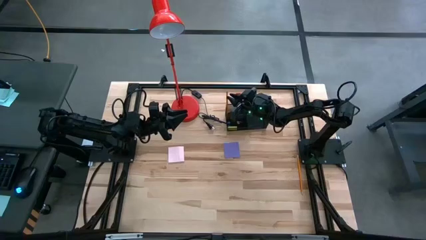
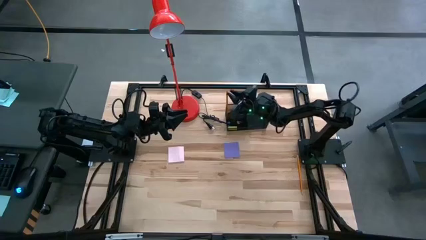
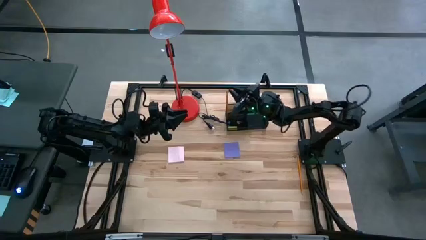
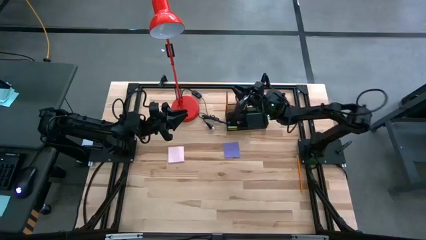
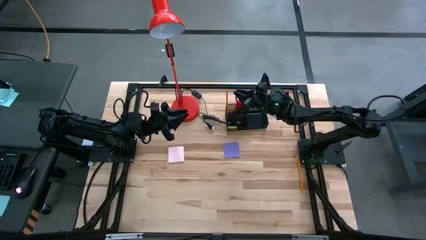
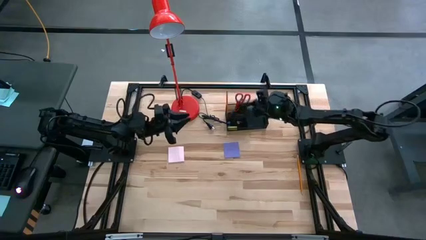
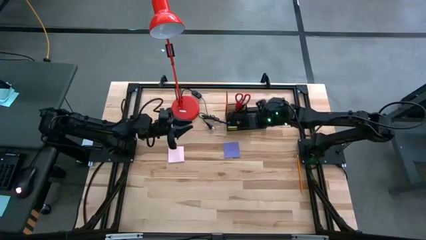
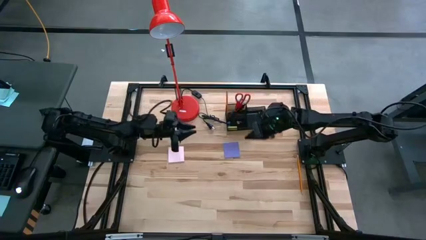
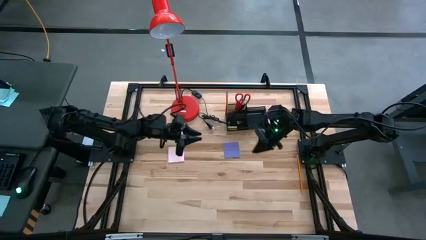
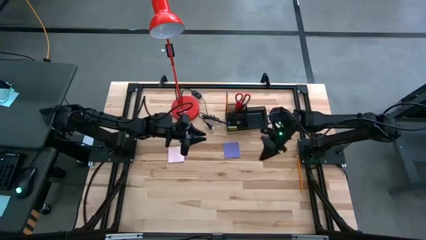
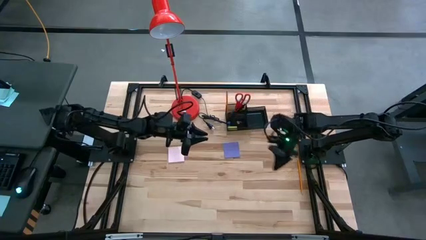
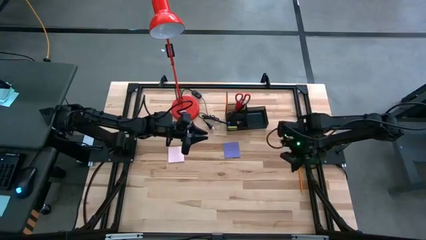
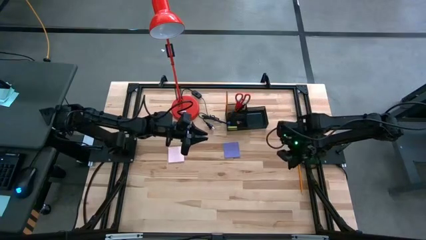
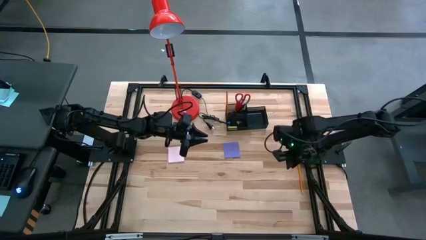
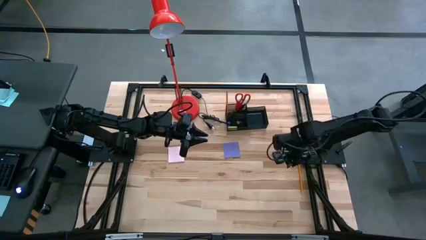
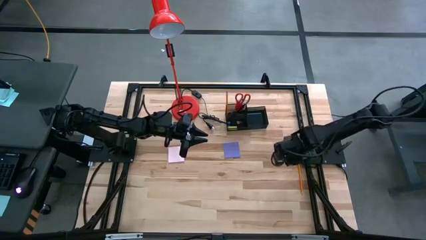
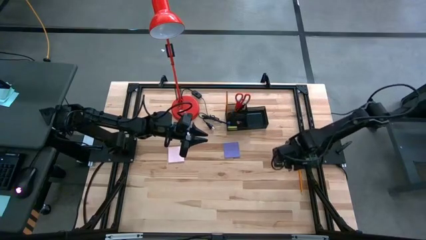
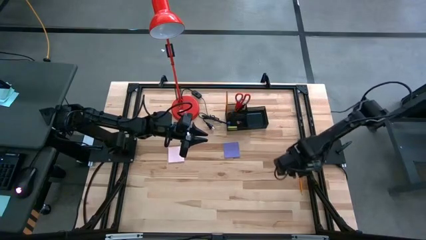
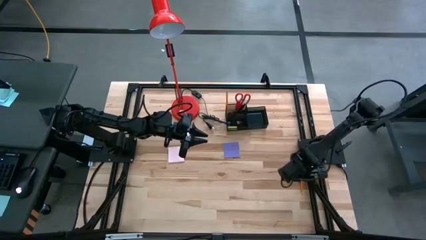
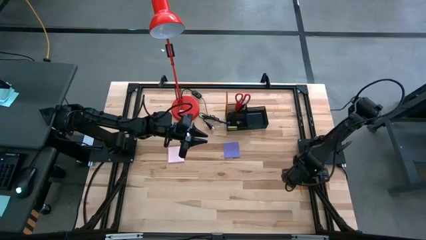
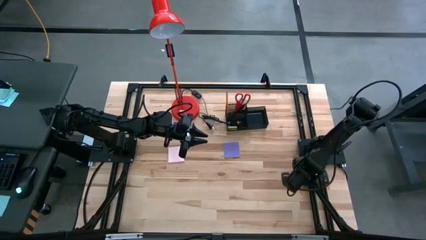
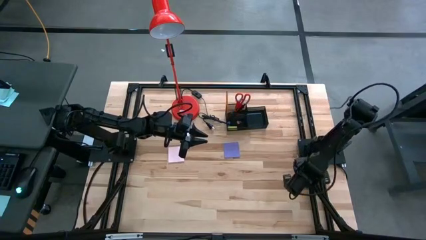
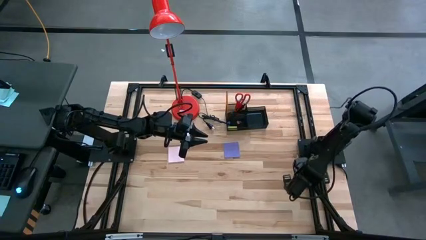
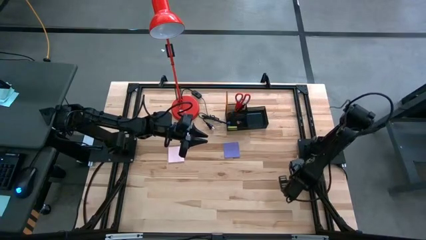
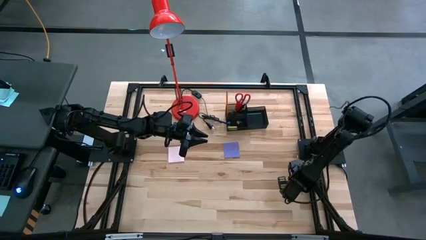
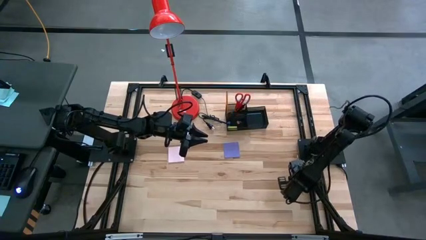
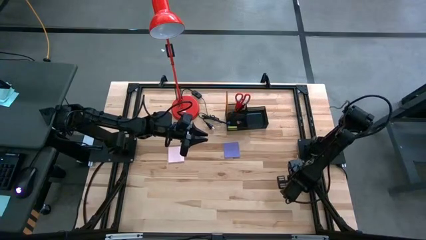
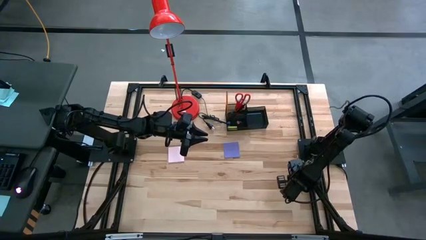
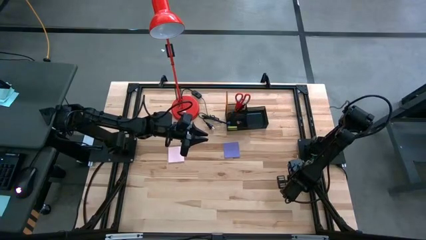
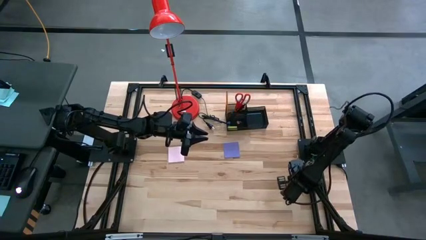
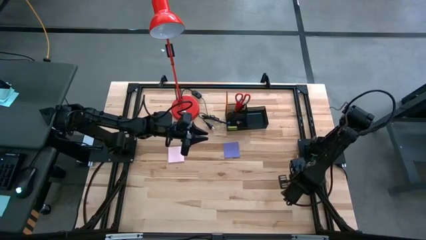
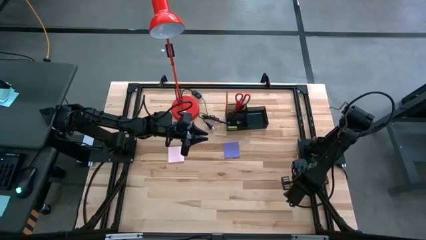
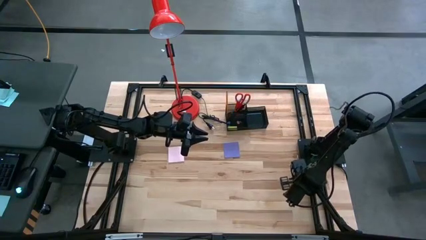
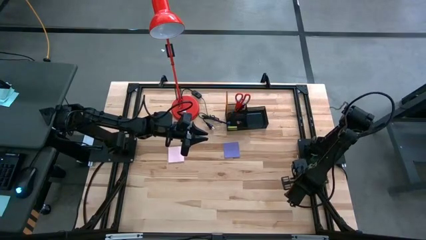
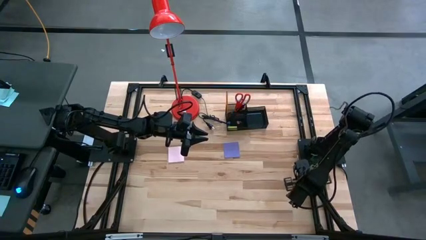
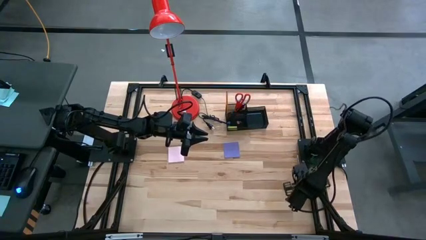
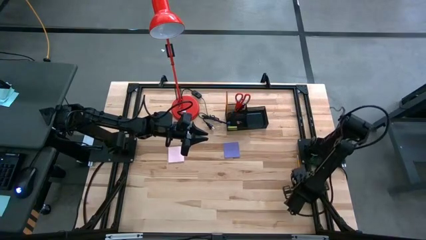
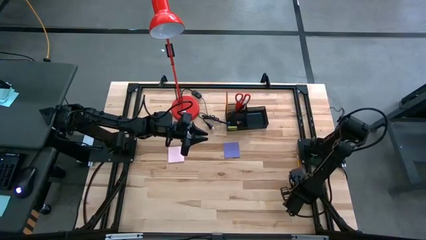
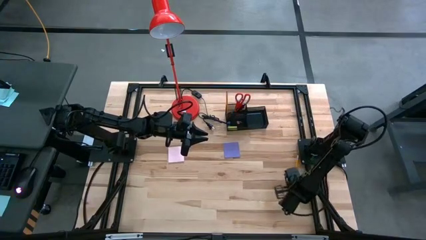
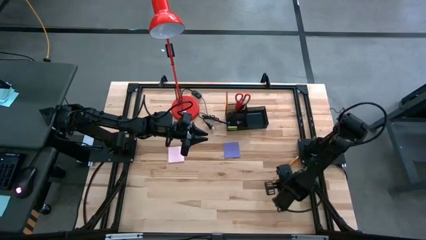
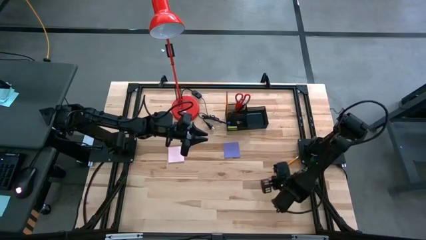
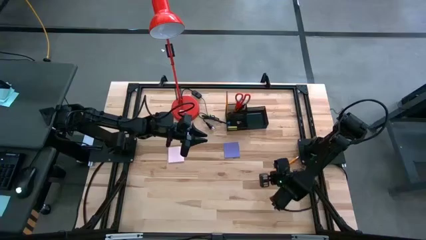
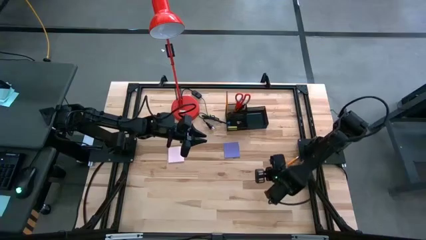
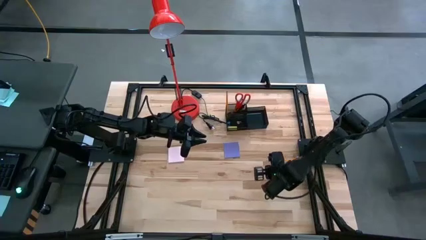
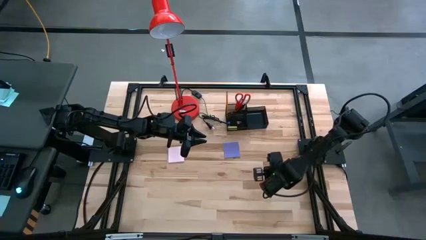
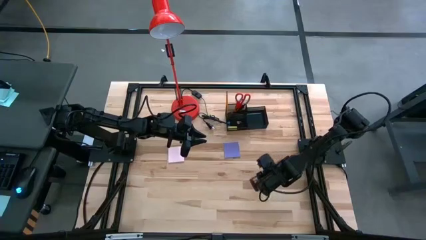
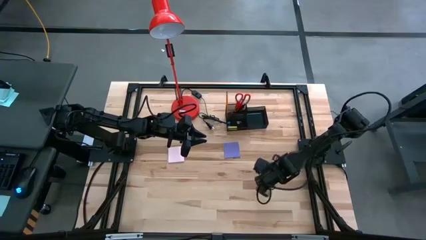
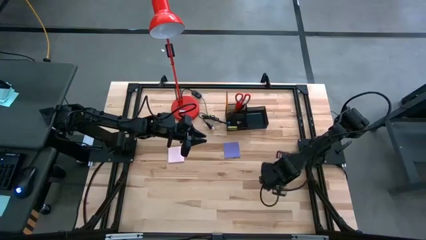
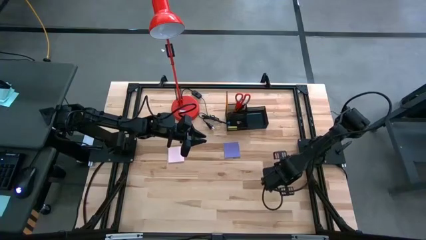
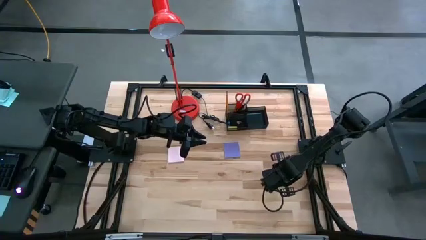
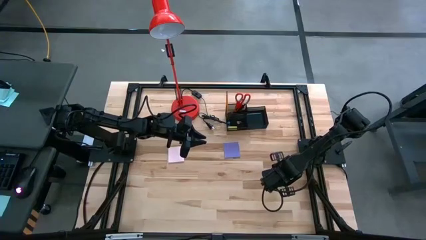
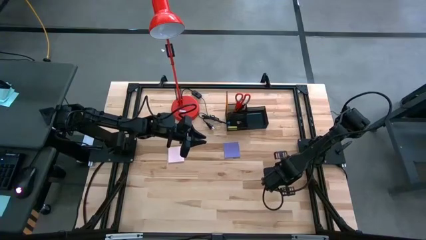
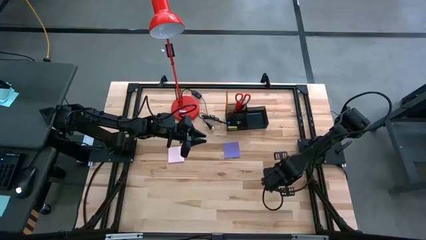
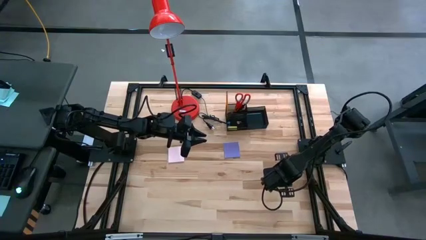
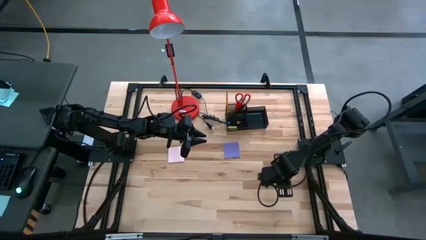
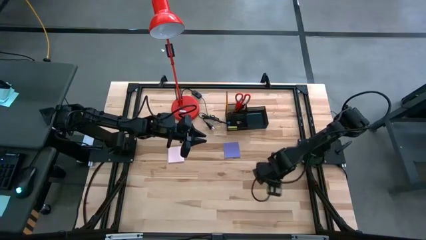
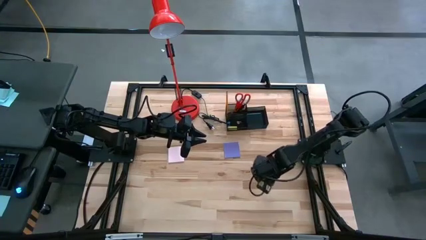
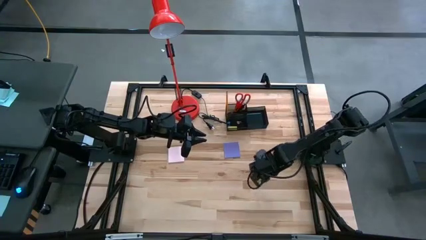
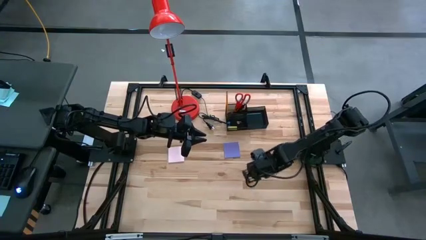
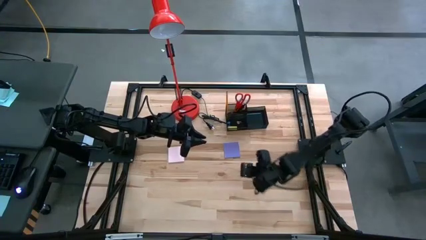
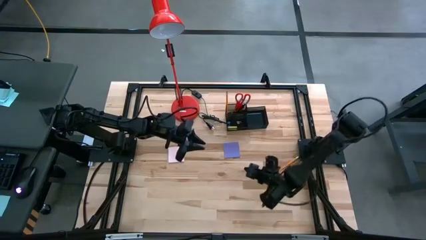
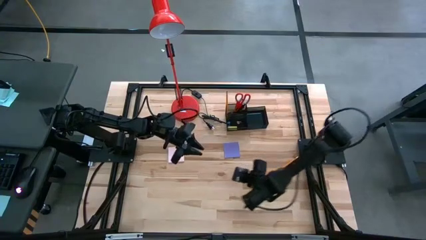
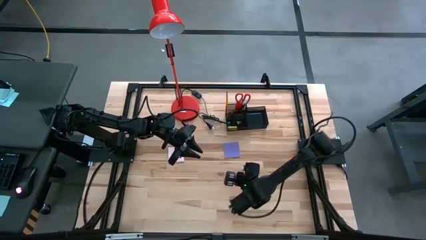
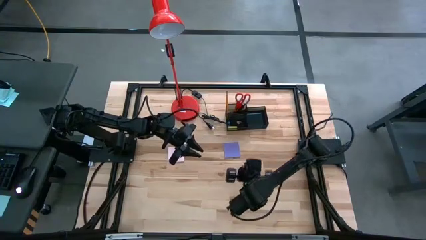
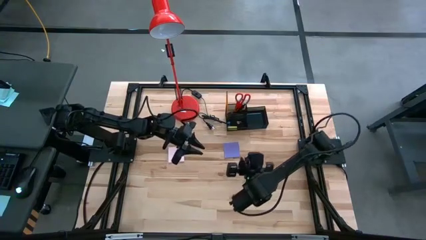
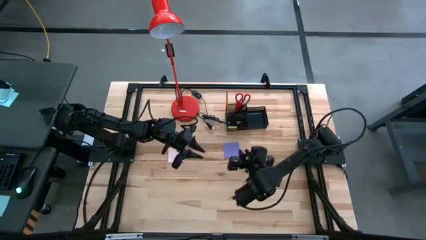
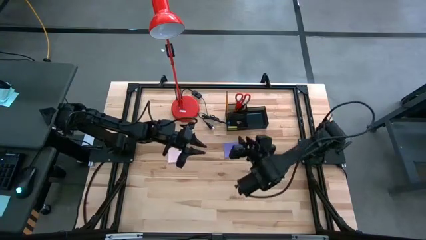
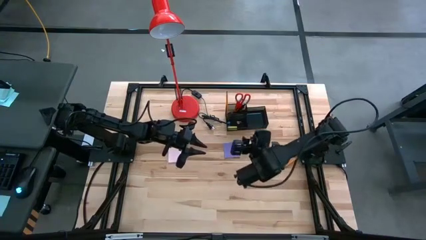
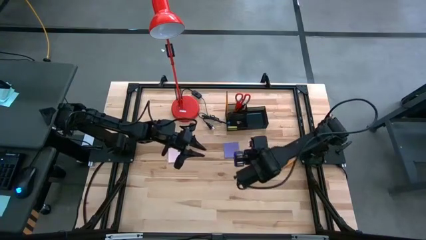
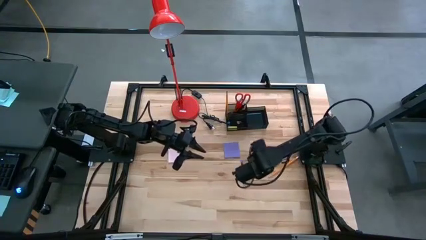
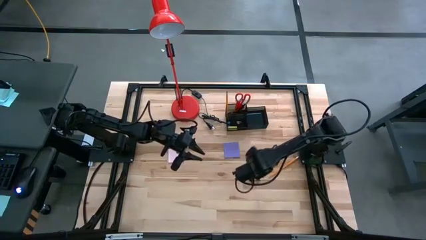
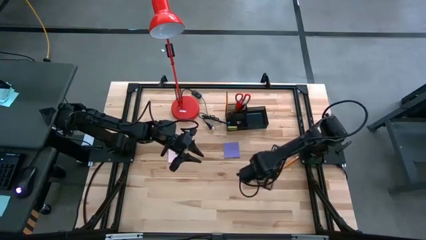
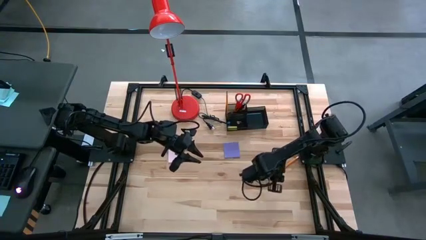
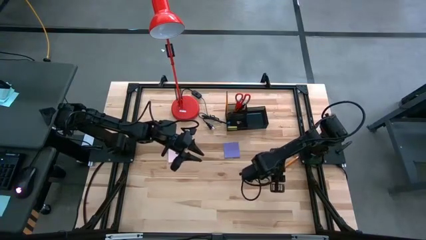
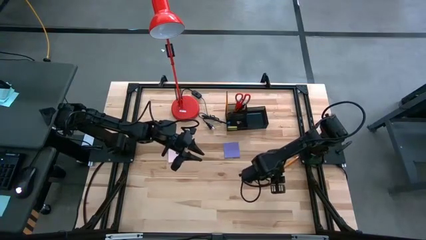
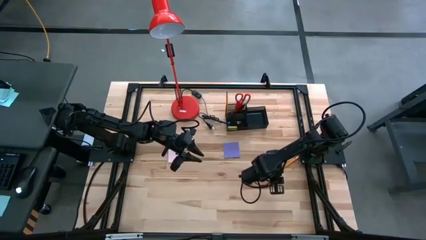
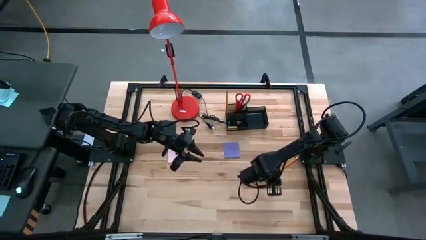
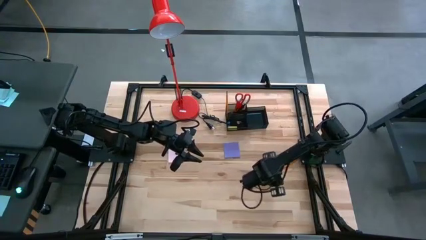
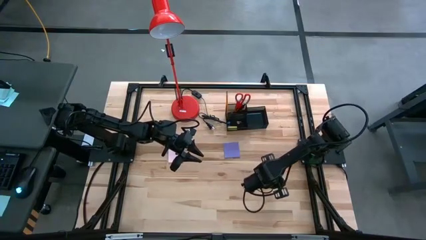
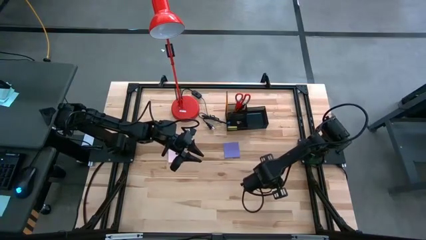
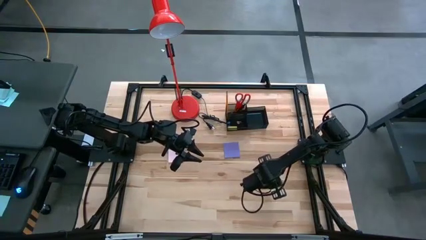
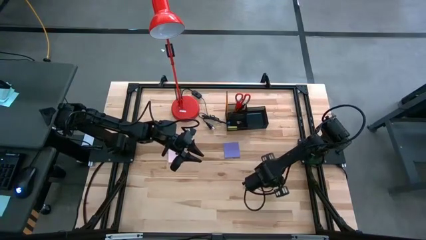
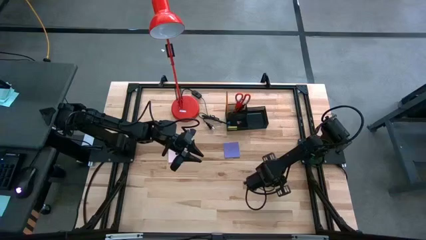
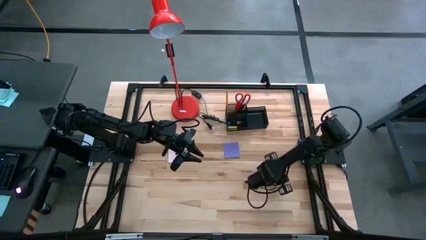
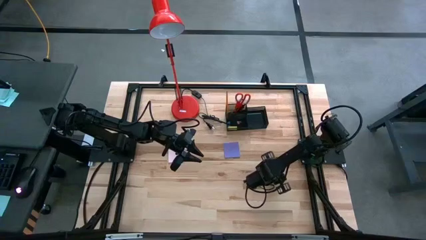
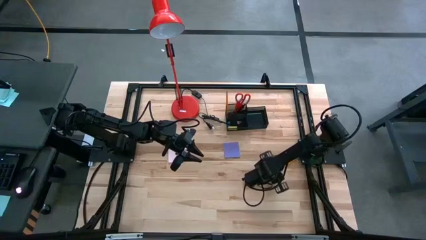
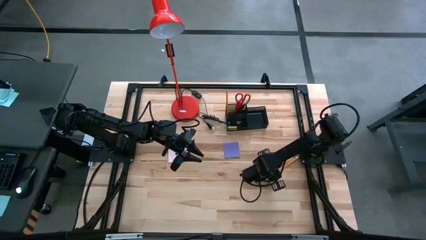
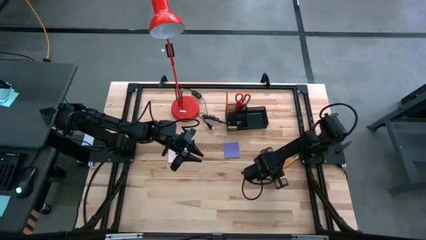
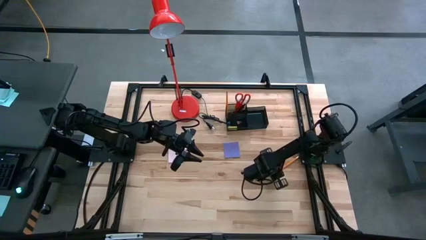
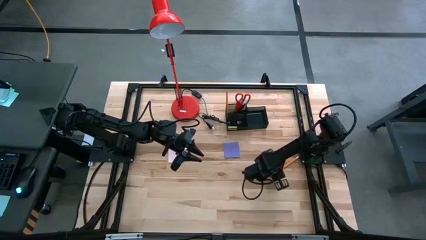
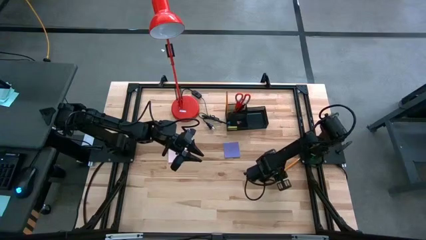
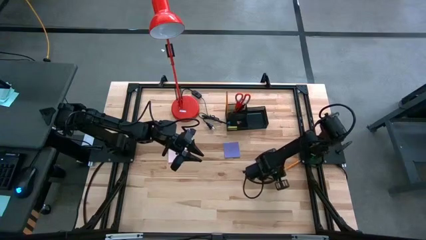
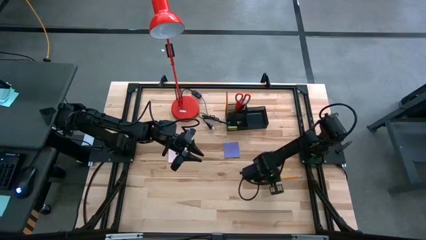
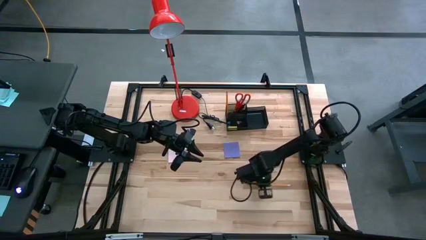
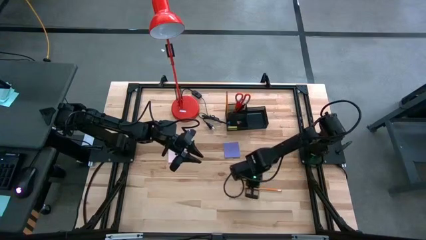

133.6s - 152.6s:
Task: Pick and place office supplies into organizer
Put the orange pencil into the black desk organizer
